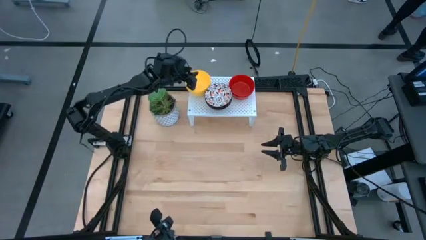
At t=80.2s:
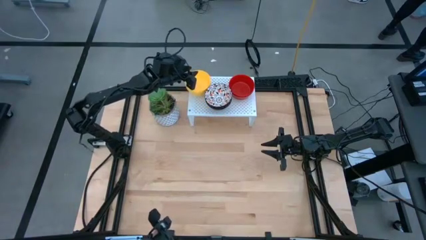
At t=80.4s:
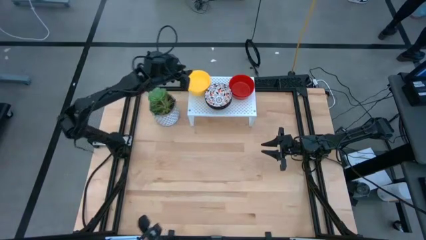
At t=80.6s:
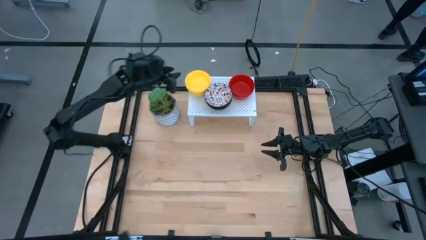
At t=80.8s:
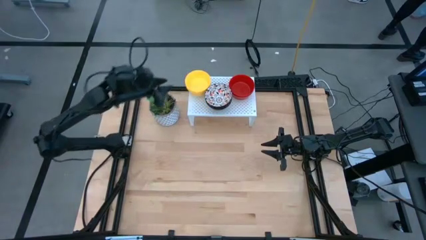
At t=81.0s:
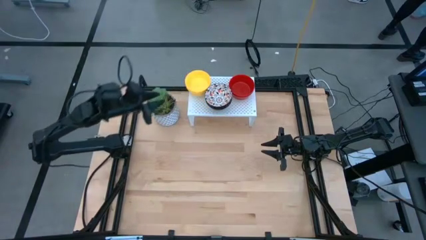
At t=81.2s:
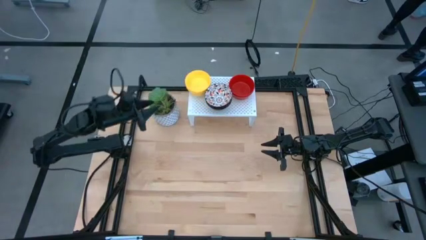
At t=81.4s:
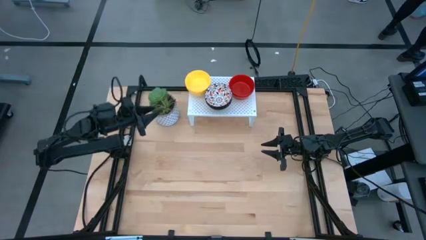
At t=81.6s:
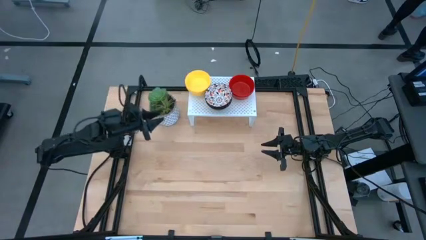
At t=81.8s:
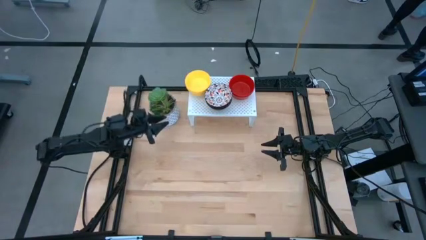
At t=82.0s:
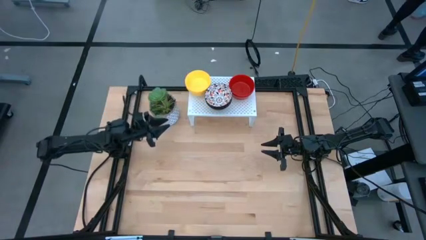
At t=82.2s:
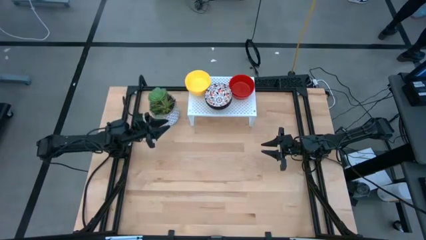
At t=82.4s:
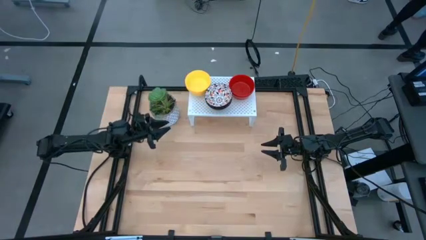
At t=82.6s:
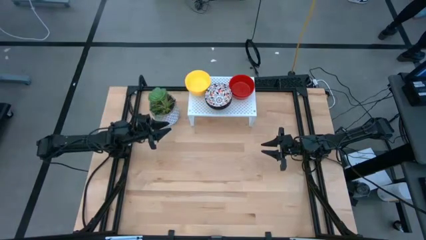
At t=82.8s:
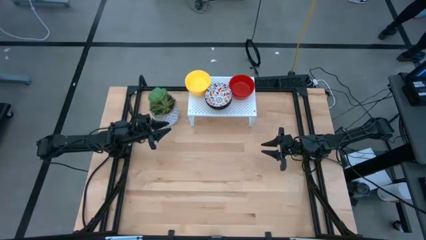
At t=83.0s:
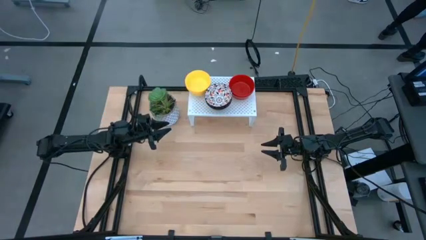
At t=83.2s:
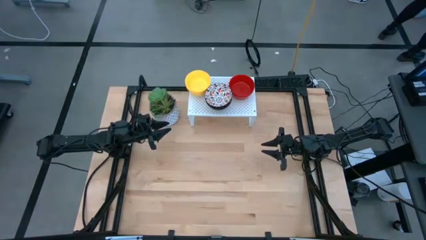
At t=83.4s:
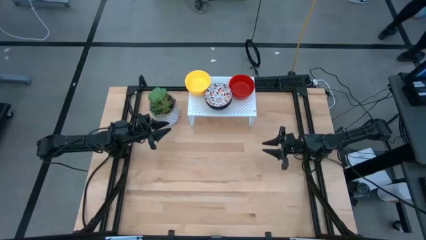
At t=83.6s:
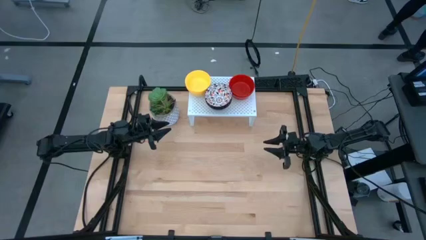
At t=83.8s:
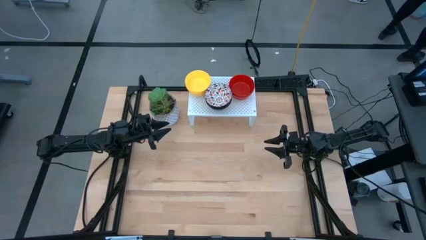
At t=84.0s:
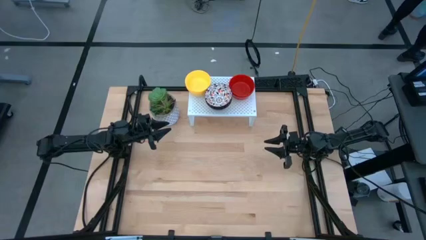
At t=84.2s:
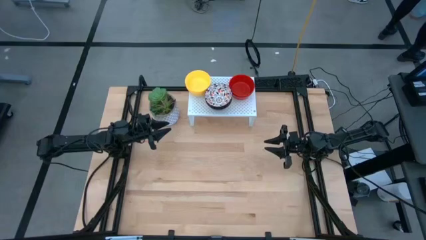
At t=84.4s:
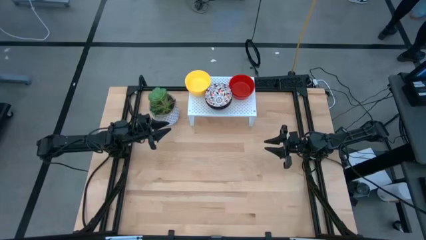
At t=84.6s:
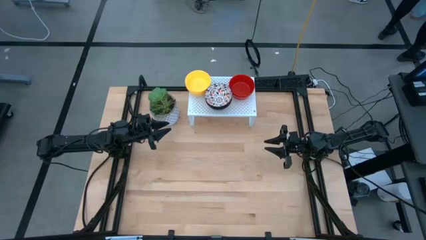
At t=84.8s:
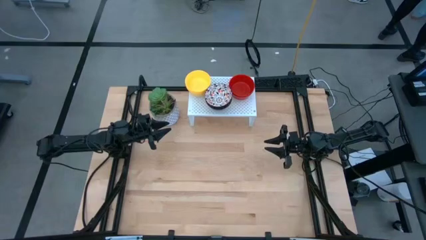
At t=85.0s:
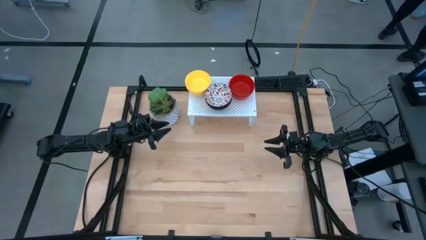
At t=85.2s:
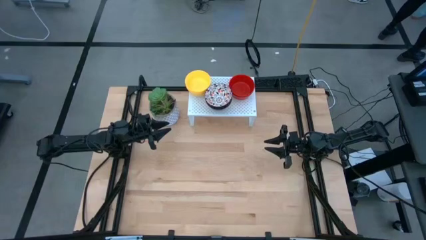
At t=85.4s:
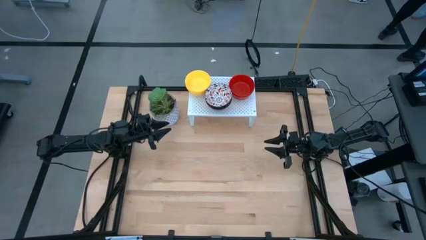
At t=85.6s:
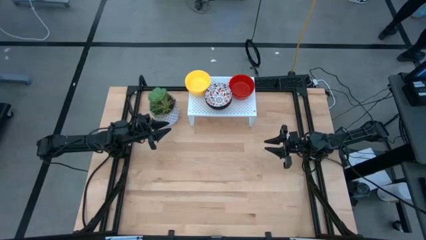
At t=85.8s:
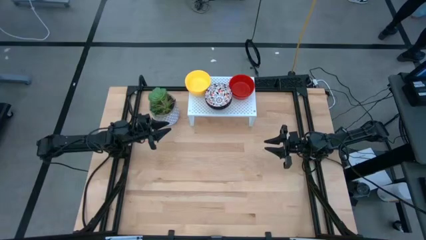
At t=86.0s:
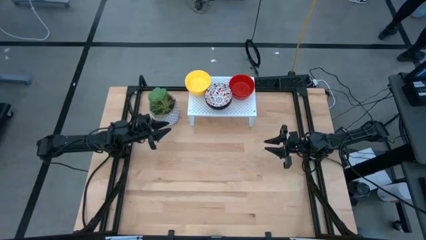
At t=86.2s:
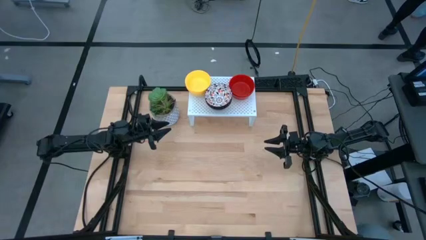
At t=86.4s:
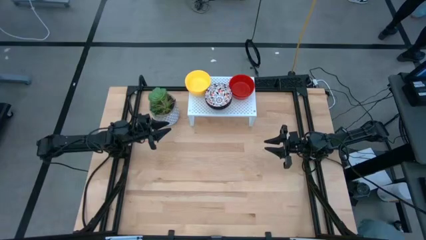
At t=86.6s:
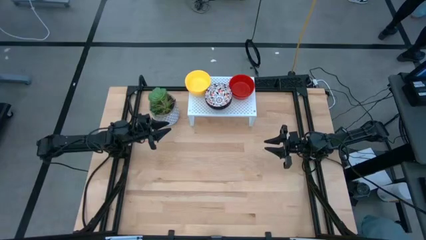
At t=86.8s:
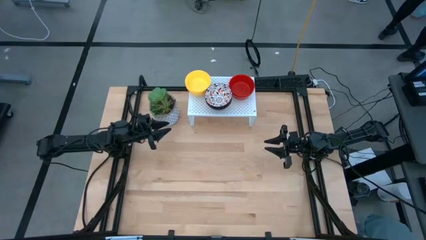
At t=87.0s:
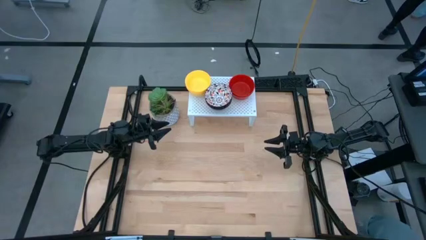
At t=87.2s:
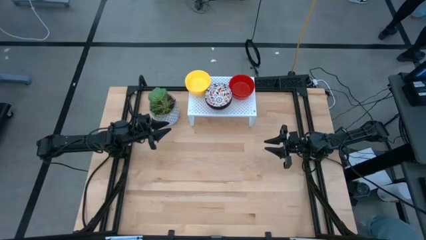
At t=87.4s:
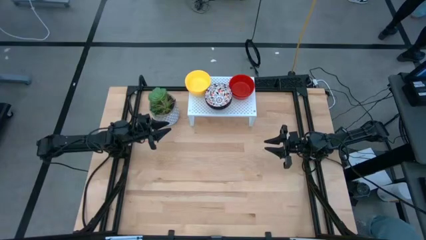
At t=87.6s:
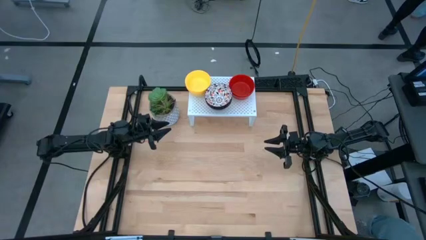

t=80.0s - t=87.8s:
Task: Pick & Place Mini bowls
Return to Home Position
